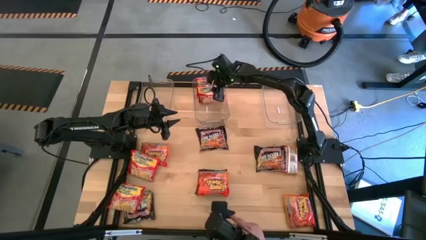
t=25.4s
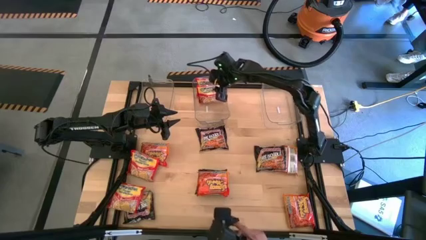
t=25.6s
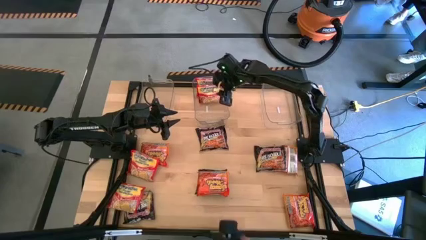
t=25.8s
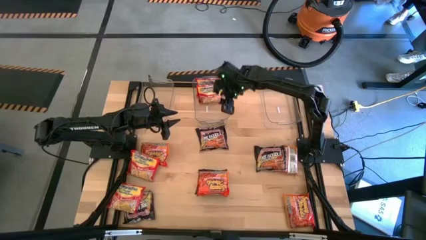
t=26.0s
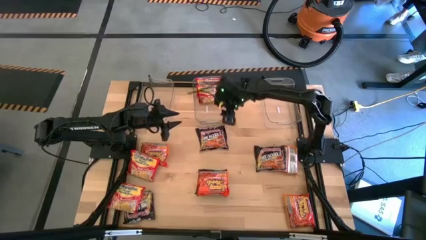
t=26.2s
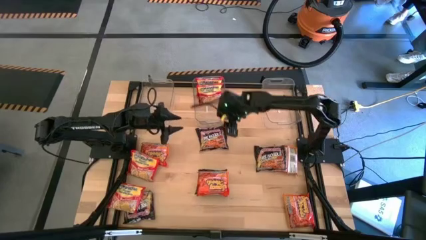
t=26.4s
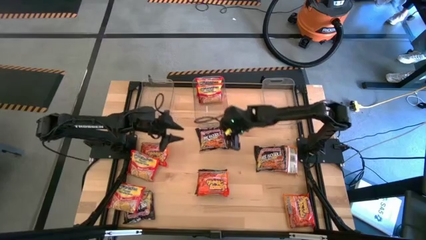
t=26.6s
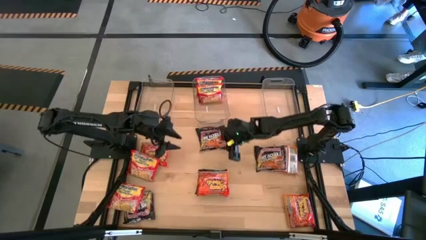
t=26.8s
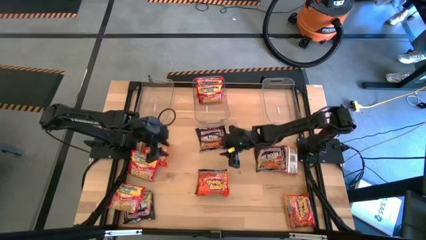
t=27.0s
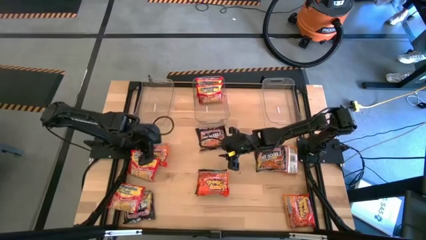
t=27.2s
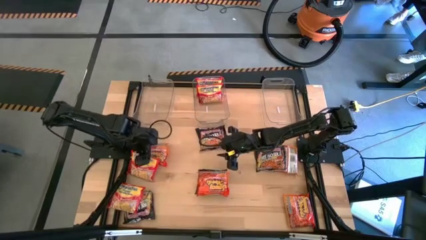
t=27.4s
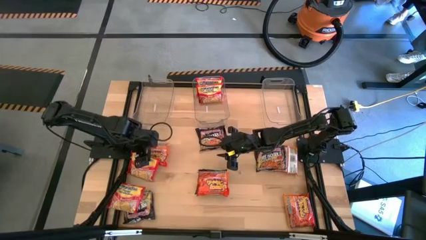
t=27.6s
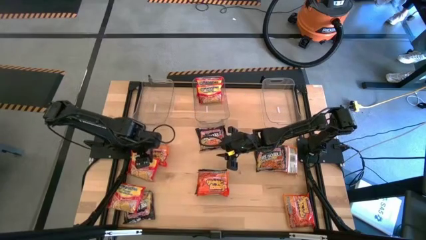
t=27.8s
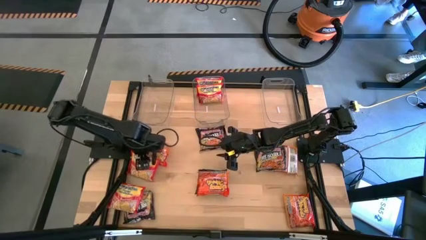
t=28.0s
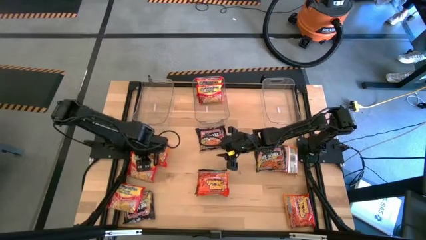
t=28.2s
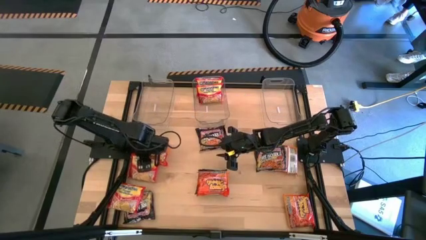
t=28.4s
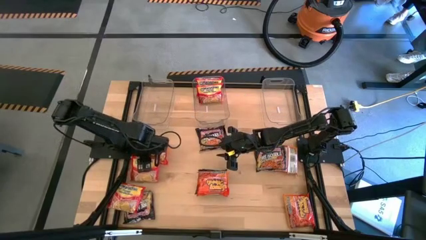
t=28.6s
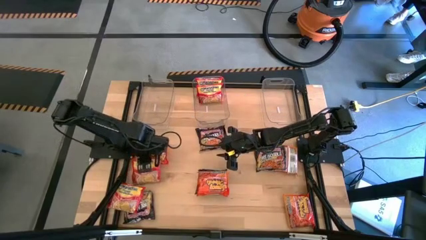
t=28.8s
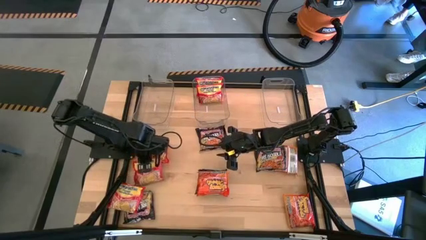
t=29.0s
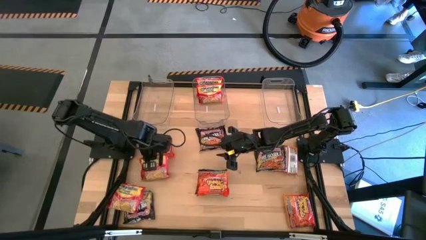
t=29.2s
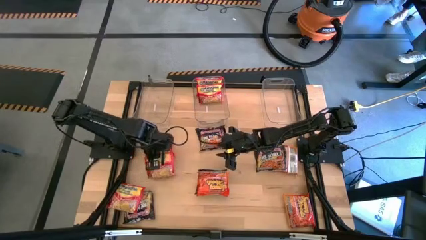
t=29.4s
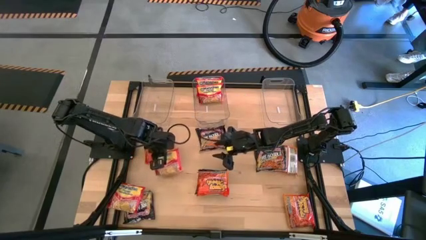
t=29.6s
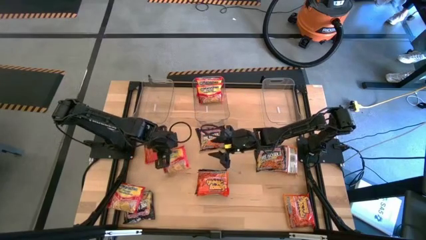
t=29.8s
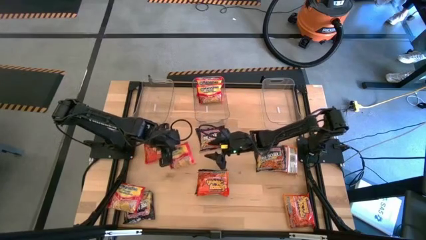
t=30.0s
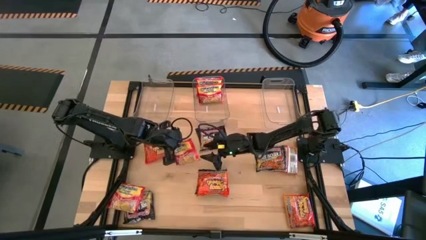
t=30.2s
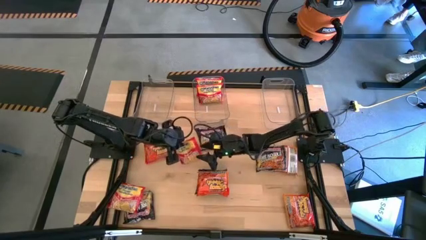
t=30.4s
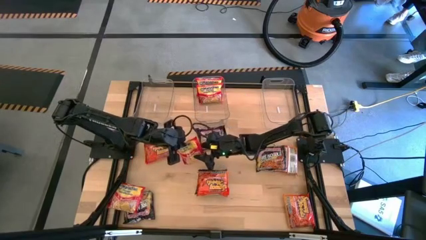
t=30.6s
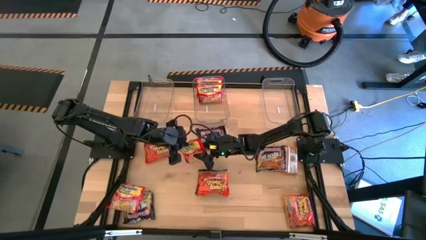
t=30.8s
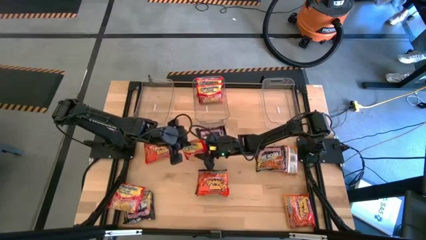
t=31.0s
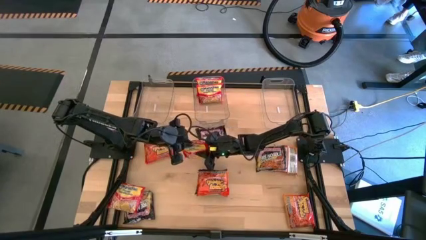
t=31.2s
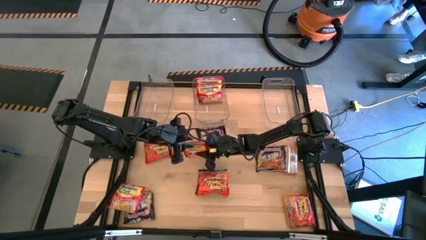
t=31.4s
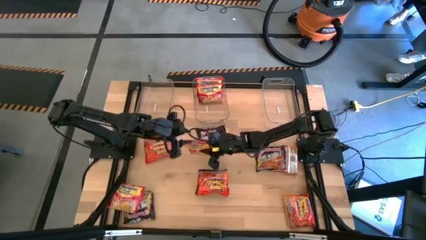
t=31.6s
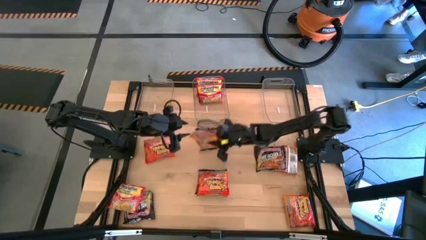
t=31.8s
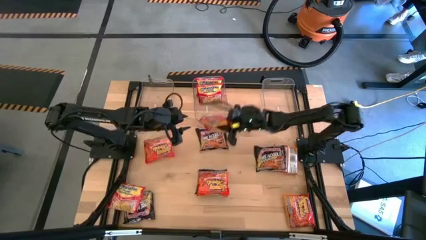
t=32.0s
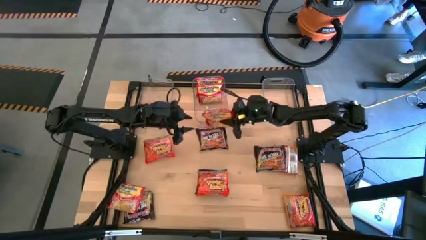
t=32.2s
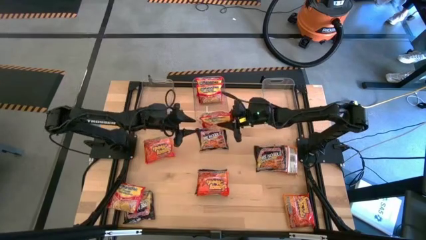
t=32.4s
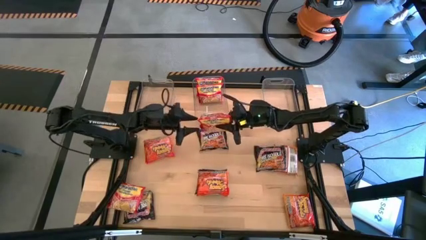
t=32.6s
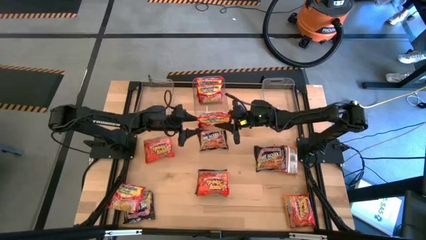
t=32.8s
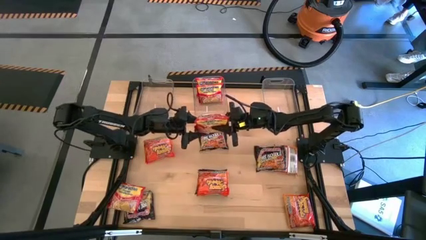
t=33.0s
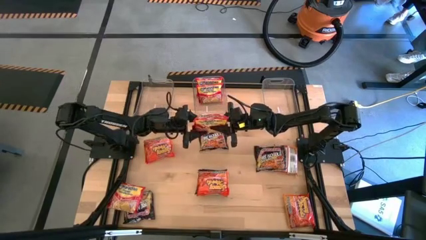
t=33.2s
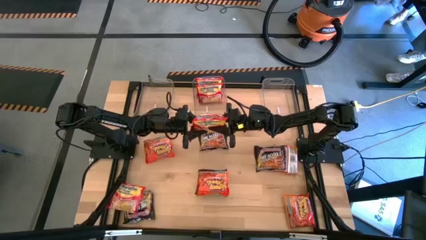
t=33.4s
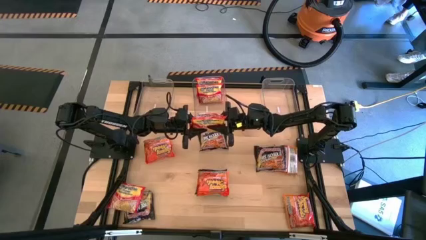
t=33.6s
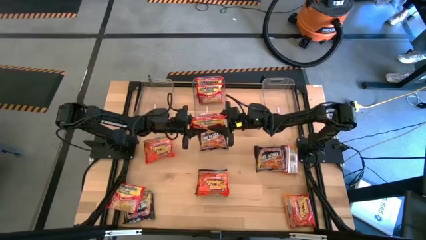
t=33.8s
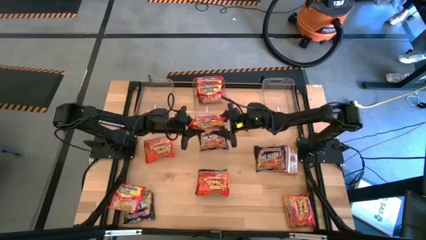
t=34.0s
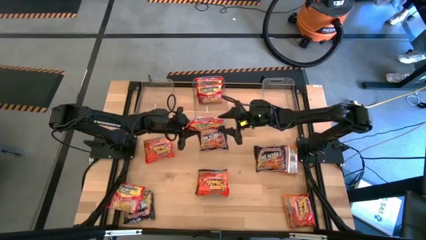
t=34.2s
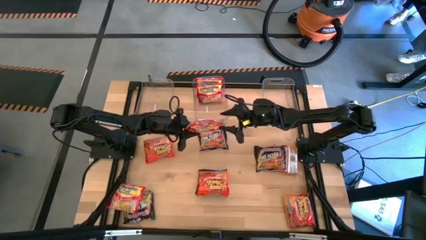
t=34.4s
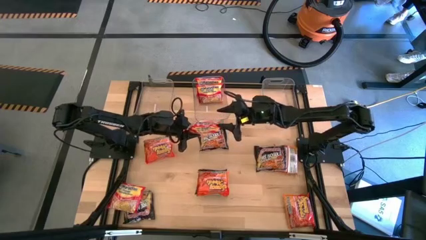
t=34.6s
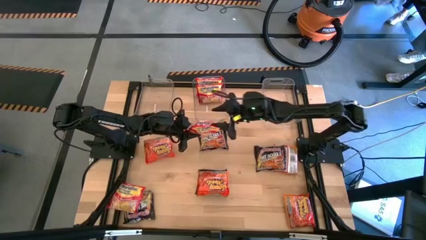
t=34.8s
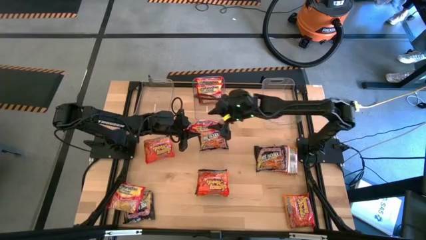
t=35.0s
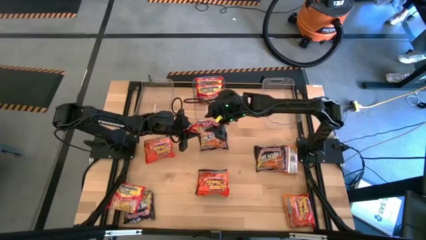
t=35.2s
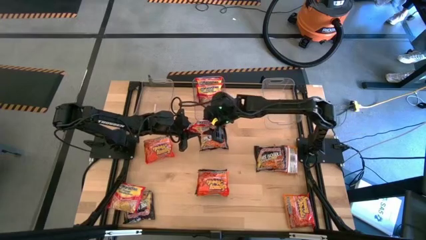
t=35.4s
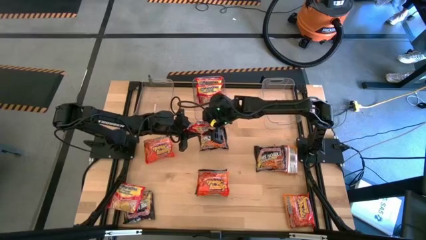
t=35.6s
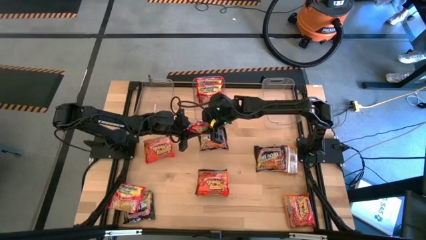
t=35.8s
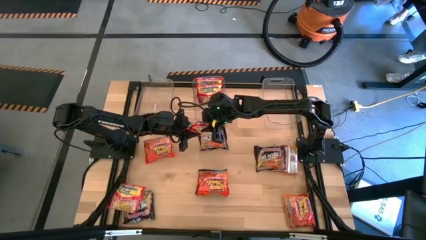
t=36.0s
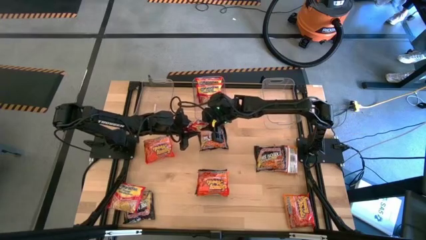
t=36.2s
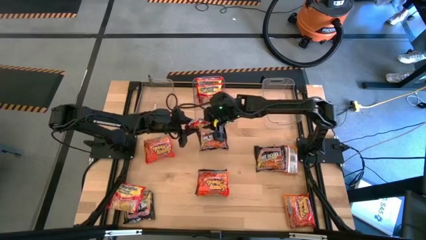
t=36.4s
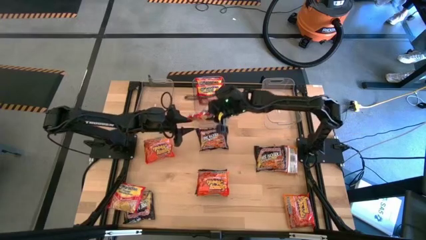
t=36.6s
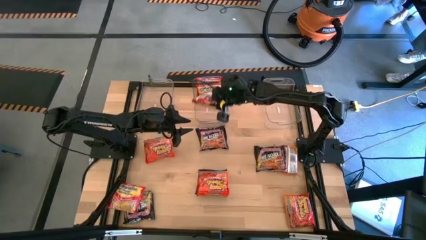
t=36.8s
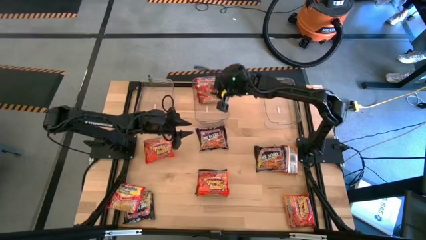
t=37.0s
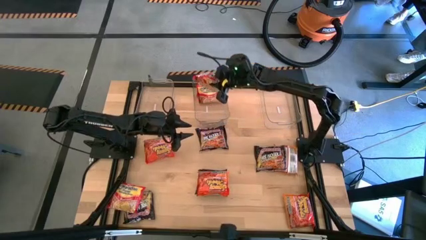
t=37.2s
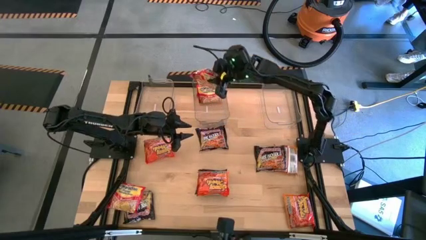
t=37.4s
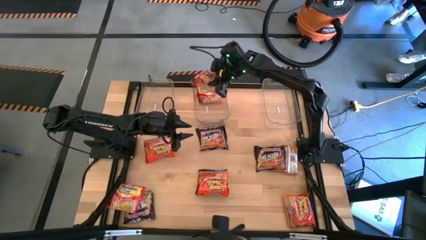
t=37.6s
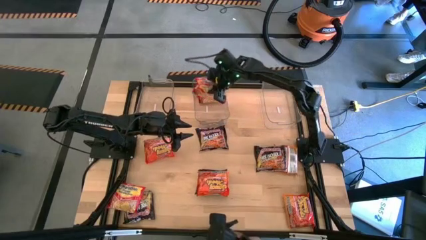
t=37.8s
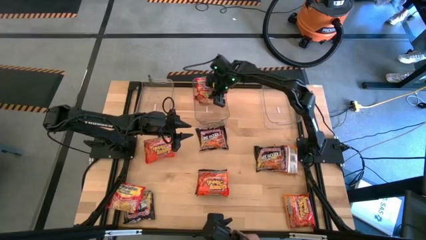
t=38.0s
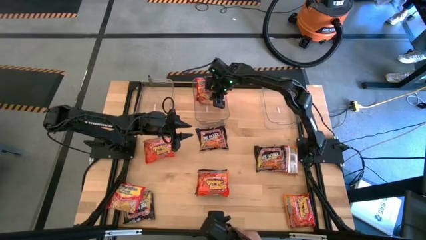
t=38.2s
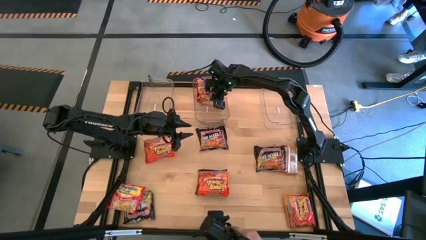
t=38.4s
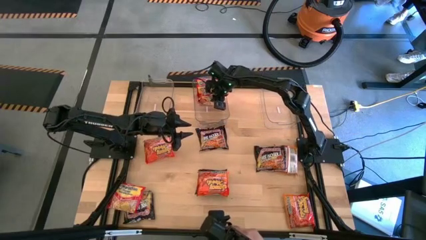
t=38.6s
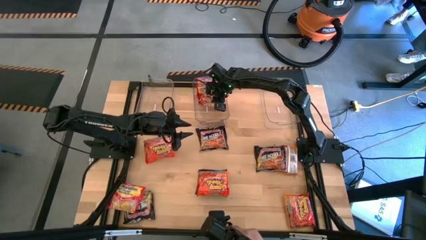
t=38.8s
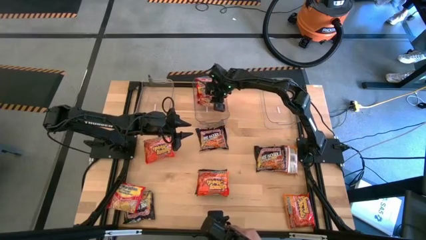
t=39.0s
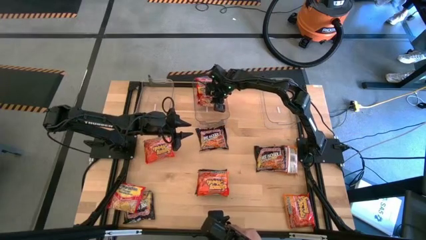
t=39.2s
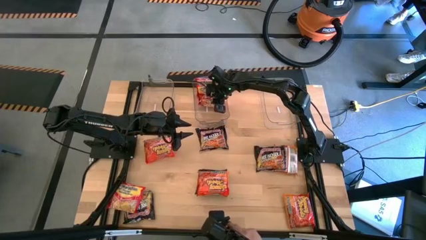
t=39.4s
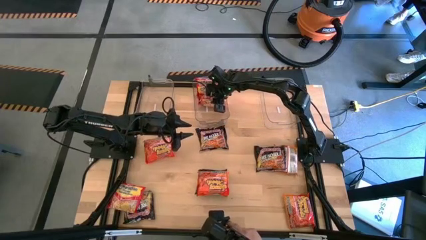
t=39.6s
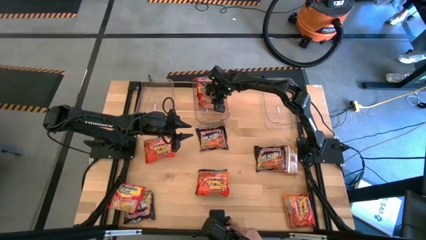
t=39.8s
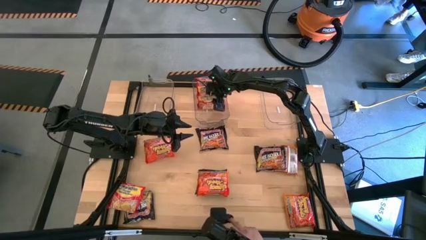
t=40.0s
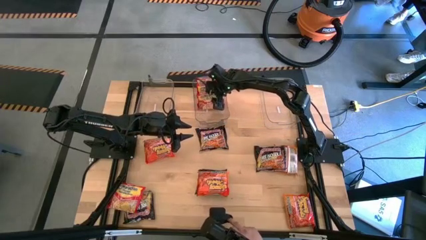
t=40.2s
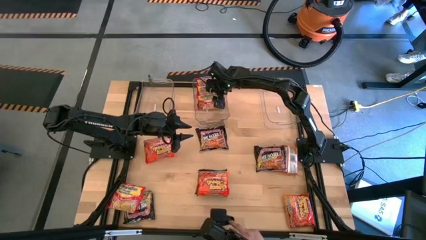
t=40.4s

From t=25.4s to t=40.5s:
Task: Sort Maruchan noodles
Put the top red noodle pack into the middle transparent bin

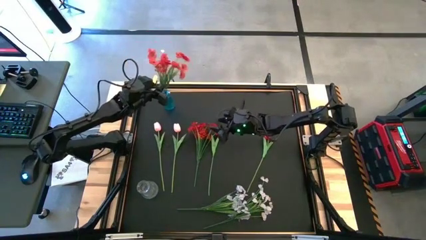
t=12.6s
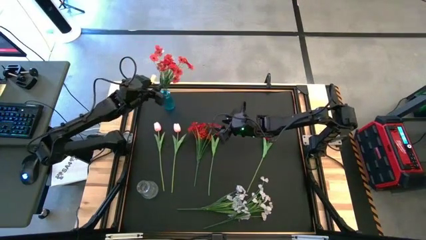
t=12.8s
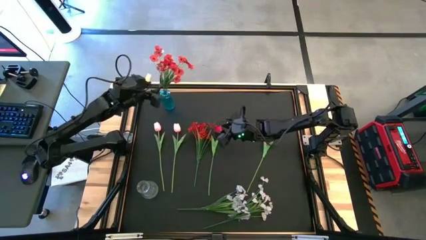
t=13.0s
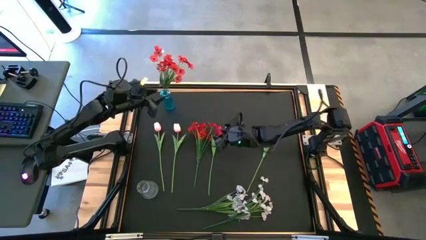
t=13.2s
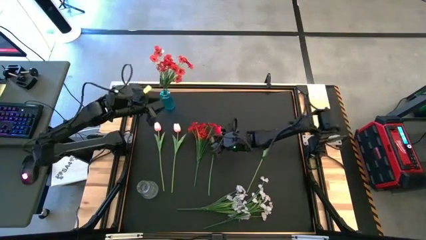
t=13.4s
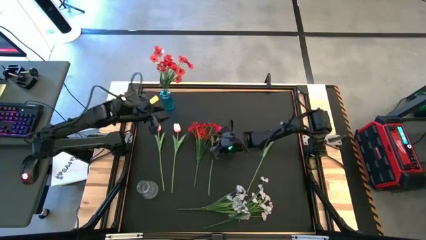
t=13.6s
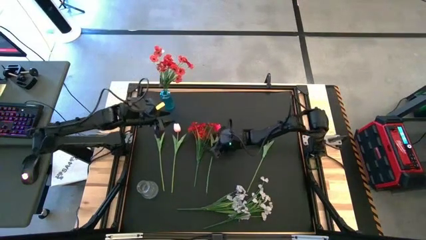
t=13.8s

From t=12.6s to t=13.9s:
Task: Sort flowers into vase by color
Adjust the left red tulip
